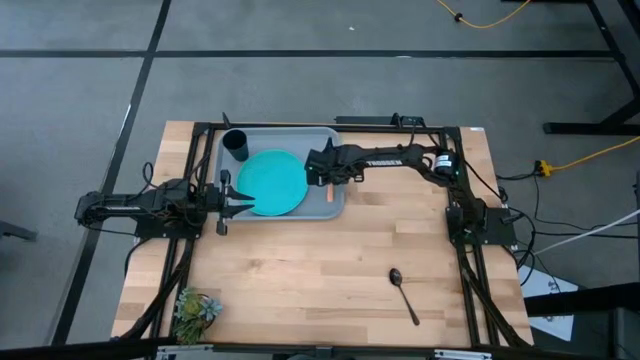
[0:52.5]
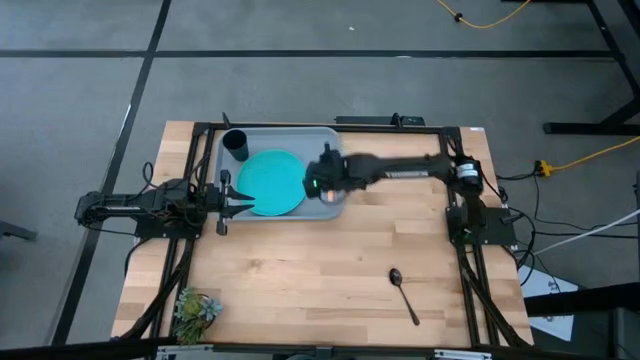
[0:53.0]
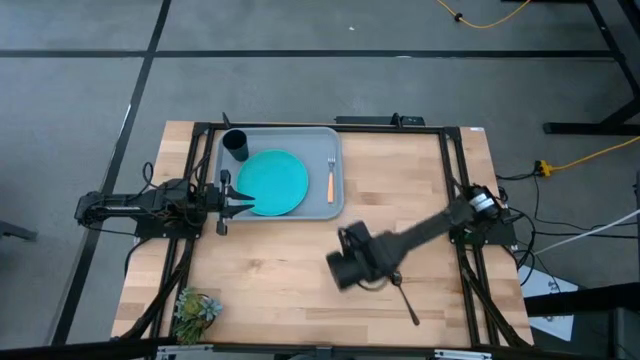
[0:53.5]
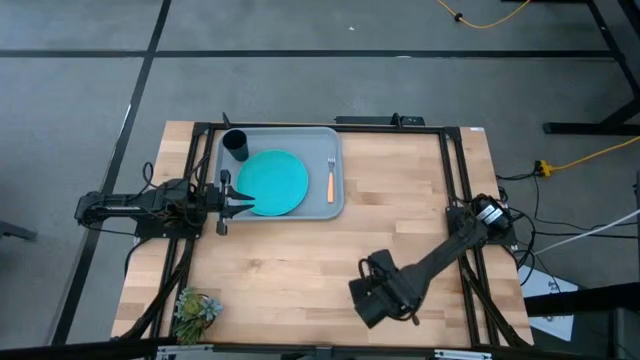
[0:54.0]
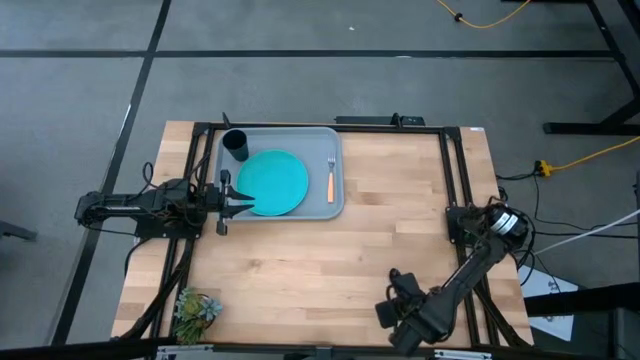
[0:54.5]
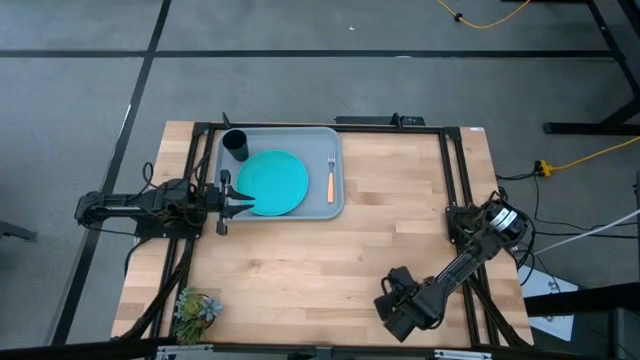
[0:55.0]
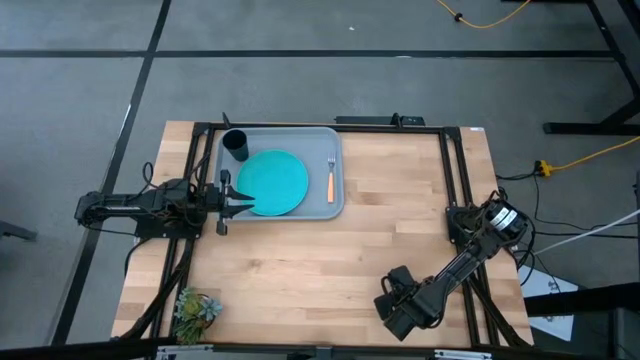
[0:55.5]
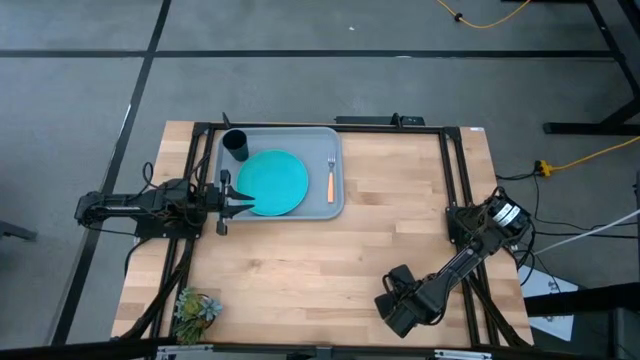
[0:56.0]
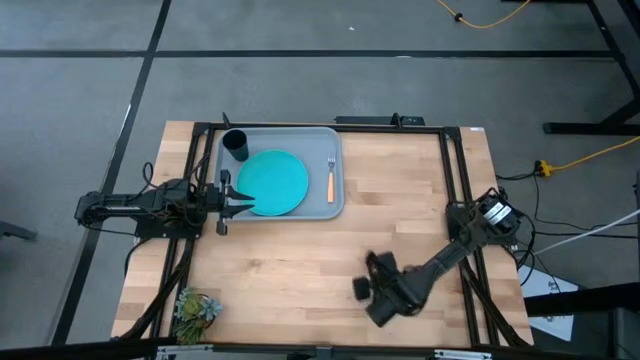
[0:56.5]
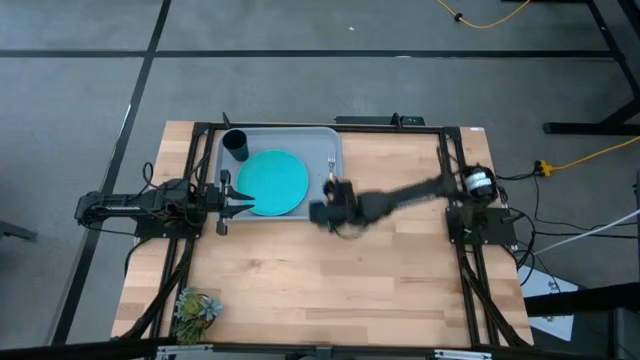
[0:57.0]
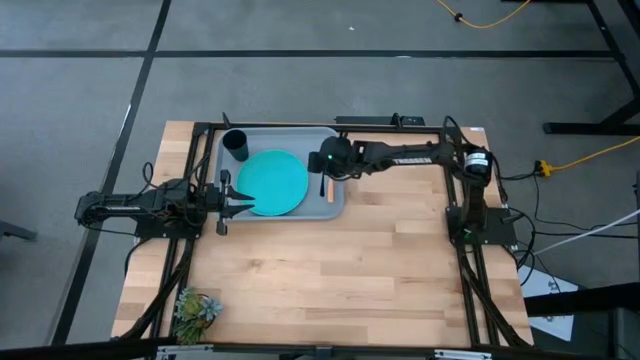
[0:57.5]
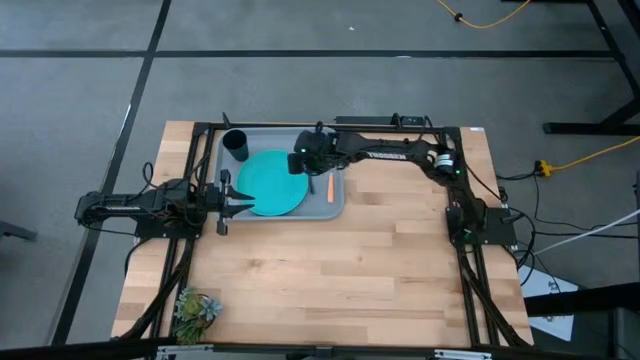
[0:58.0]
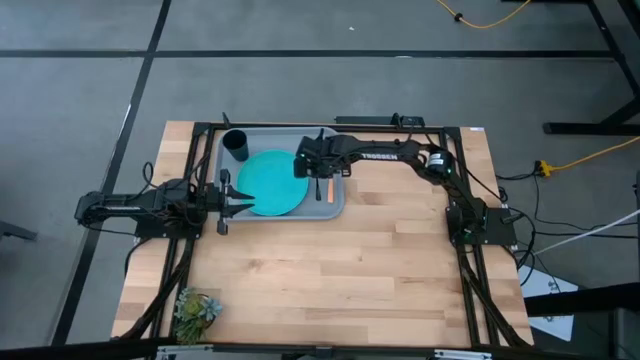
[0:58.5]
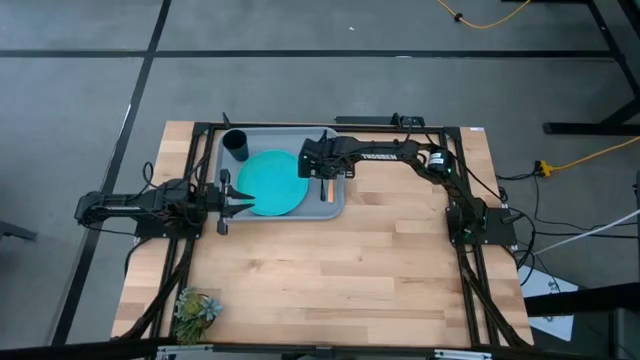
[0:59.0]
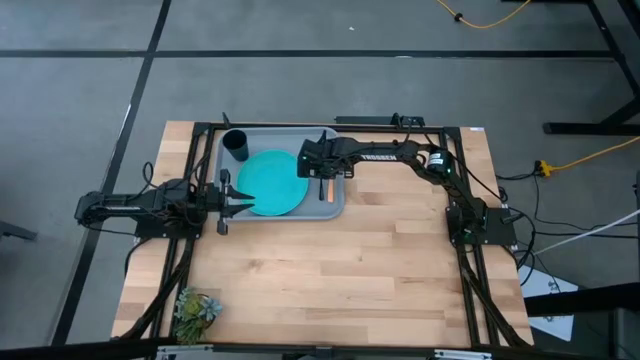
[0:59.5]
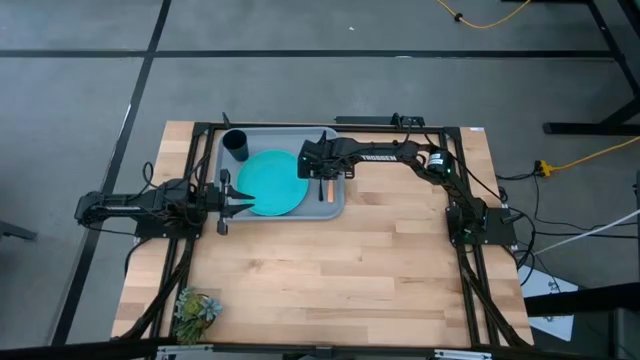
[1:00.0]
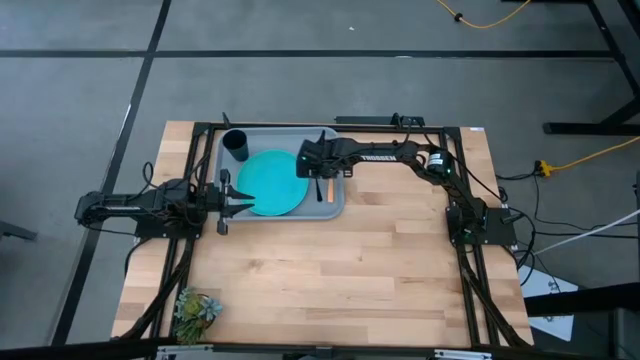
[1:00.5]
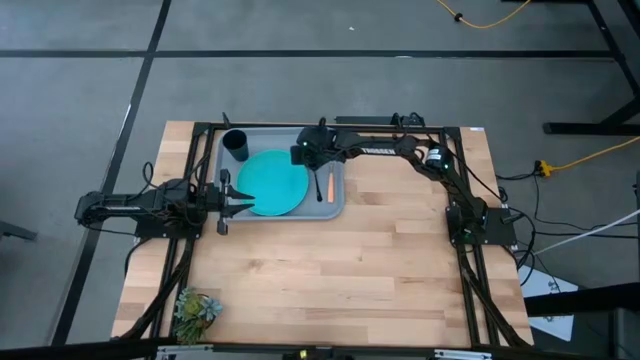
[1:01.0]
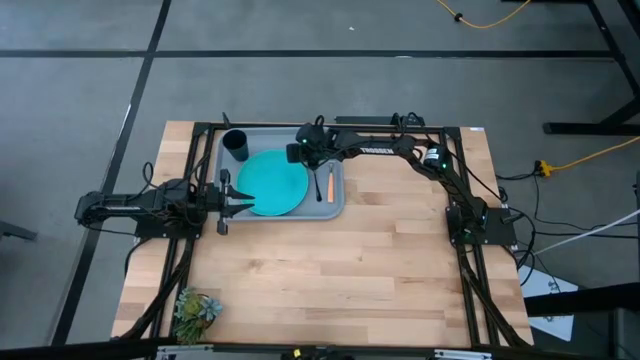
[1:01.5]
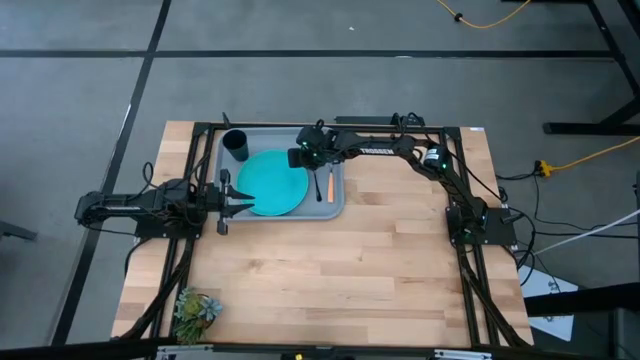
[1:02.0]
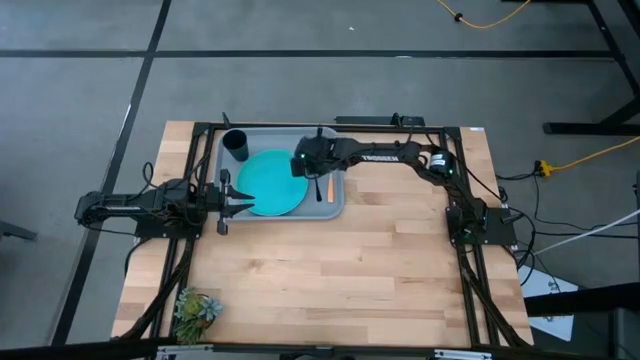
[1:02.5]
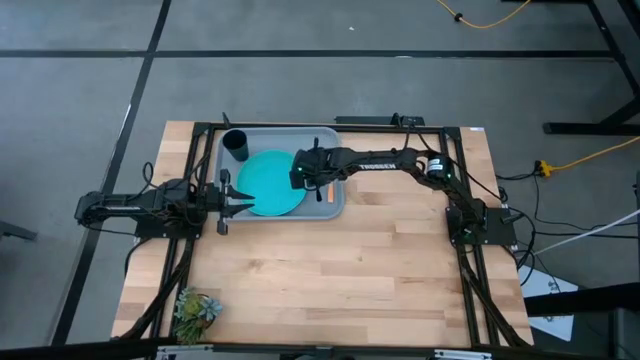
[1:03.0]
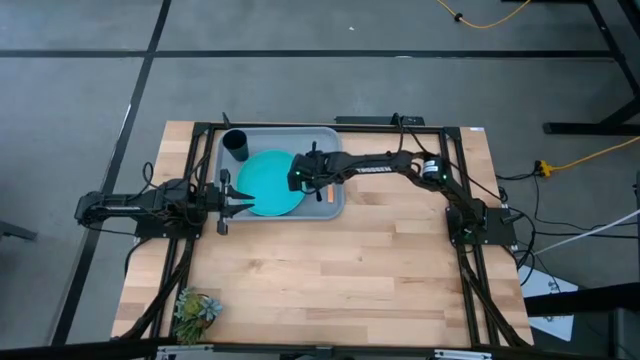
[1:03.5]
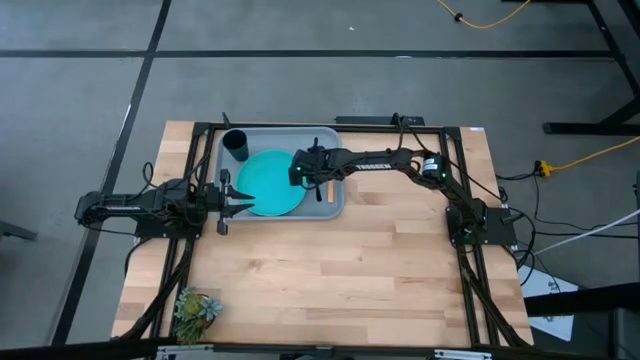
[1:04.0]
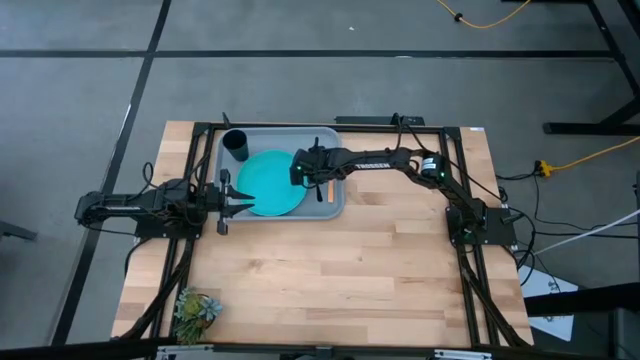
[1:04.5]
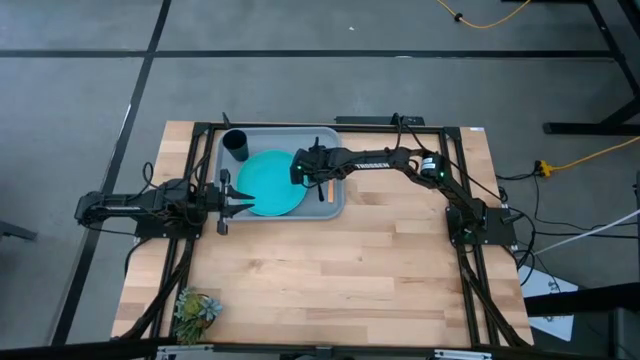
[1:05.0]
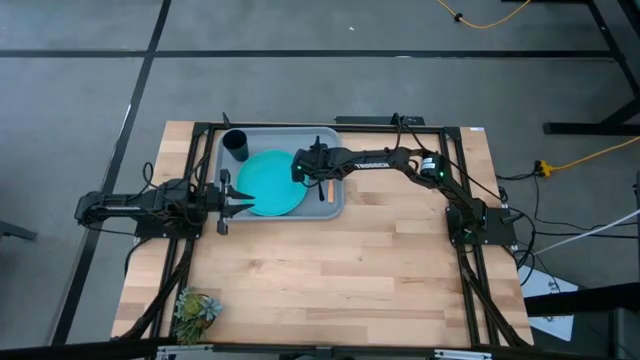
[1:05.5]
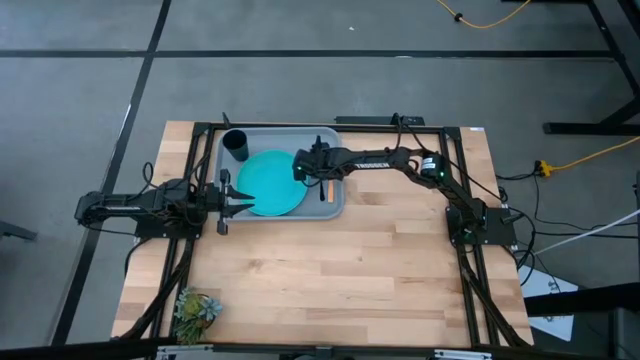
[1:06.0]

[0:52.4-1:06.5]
Task: Pick and place plate/cup/fork/spoon on tray
Put the black spoon on the serving tray left beside the yellow fork

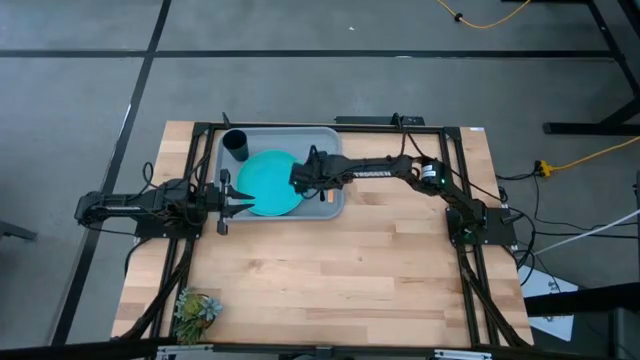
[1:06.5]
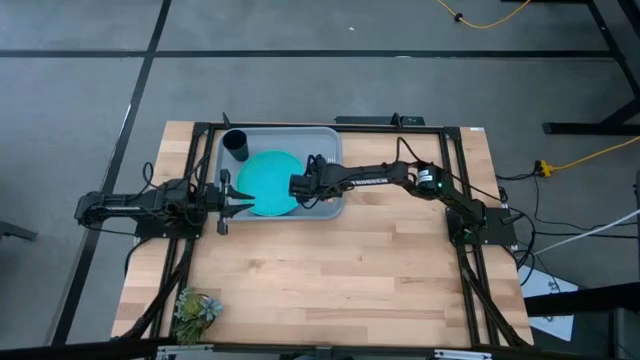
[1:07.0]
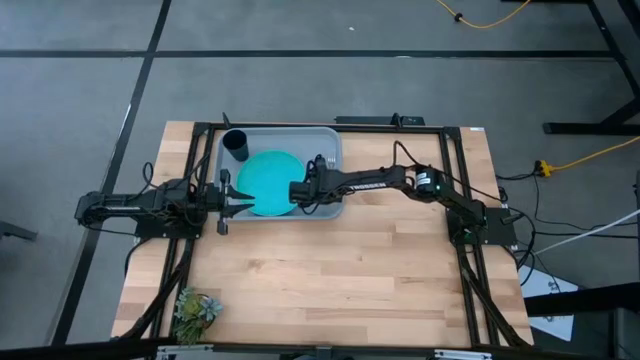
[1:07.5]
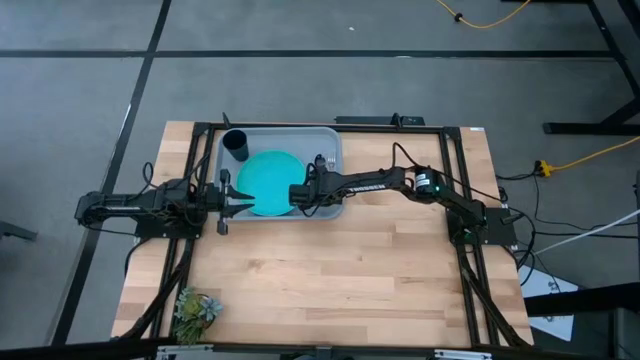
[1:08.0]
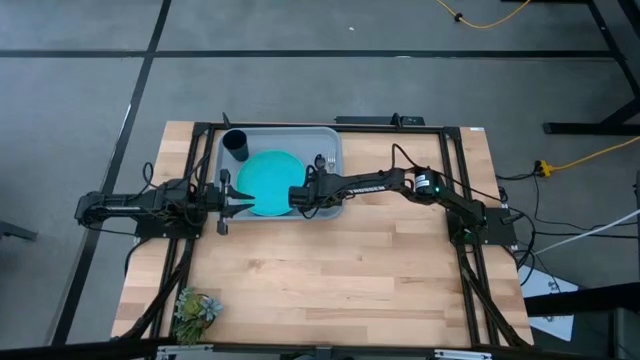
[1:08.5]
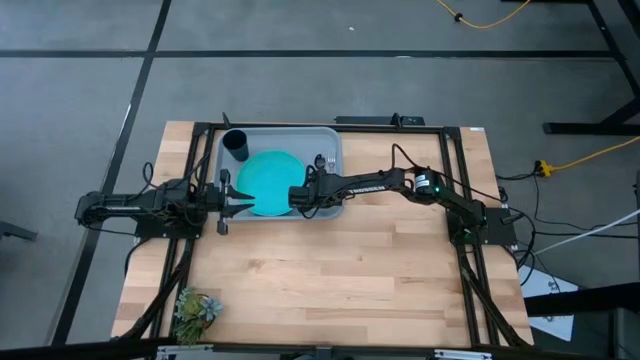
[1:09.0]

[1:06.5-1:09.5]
Adjust the yellow fork on the serving tray

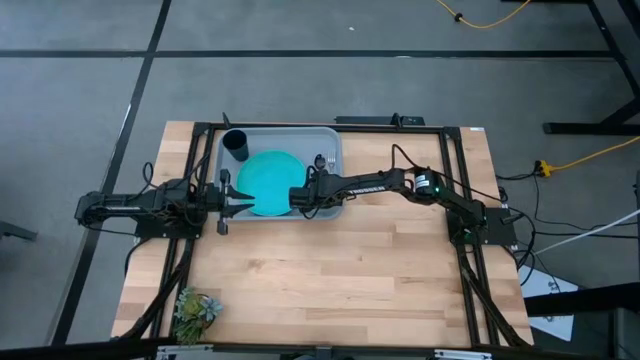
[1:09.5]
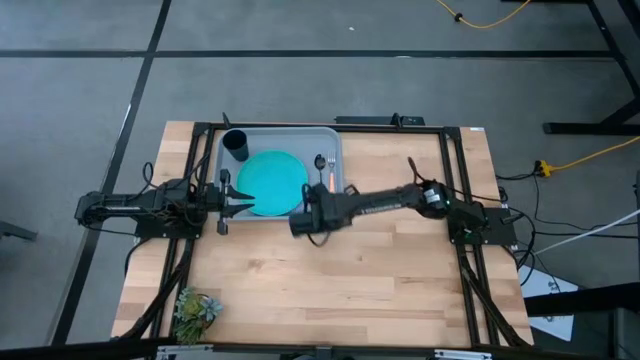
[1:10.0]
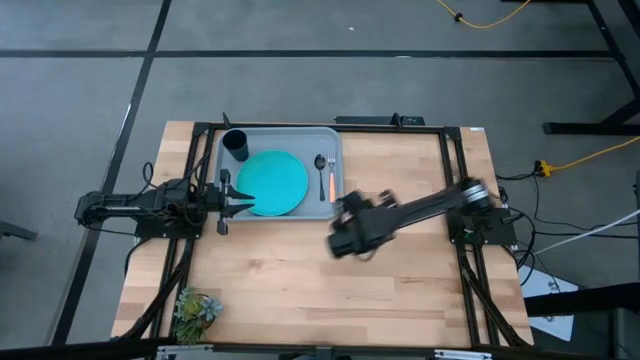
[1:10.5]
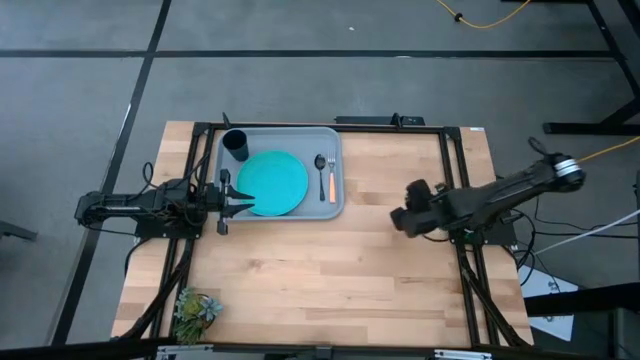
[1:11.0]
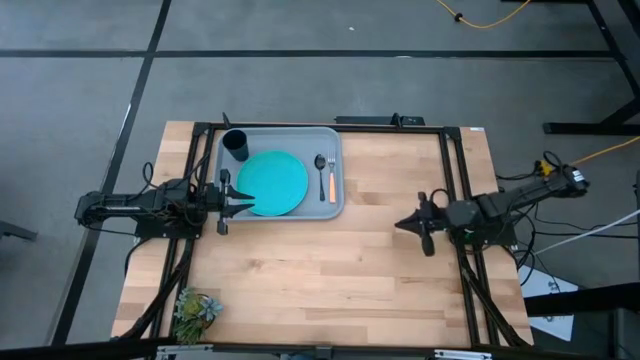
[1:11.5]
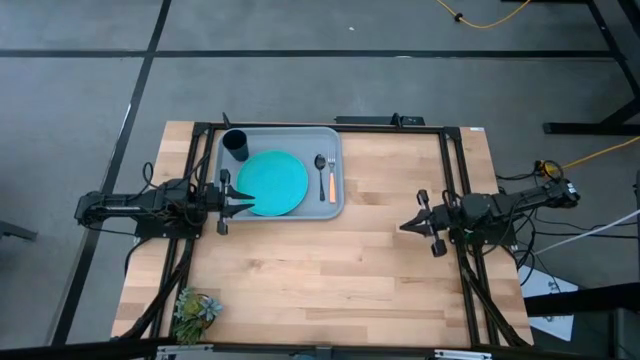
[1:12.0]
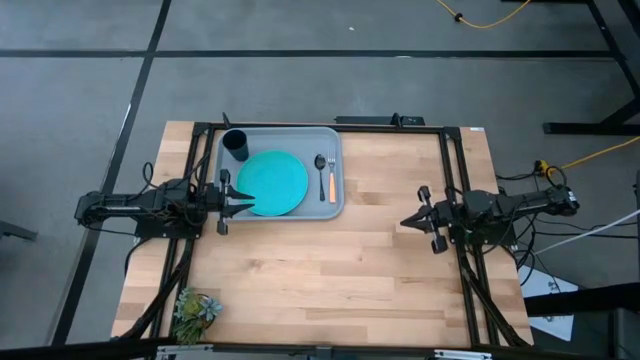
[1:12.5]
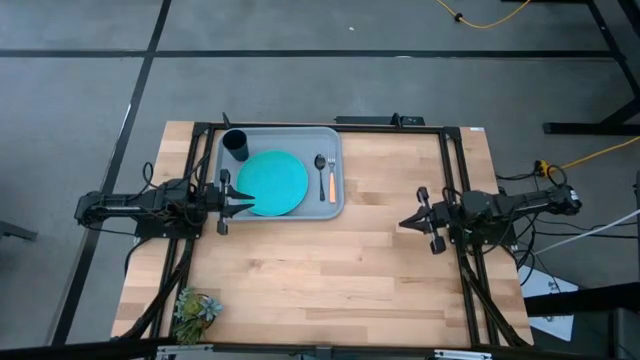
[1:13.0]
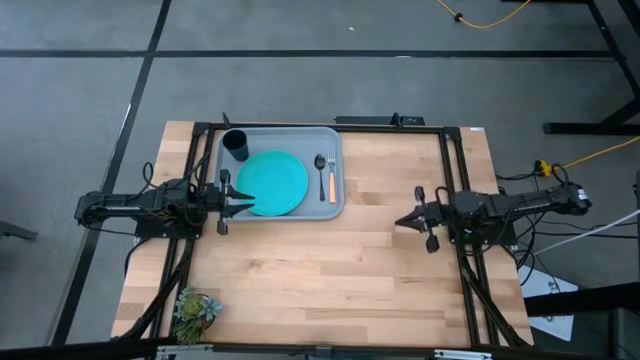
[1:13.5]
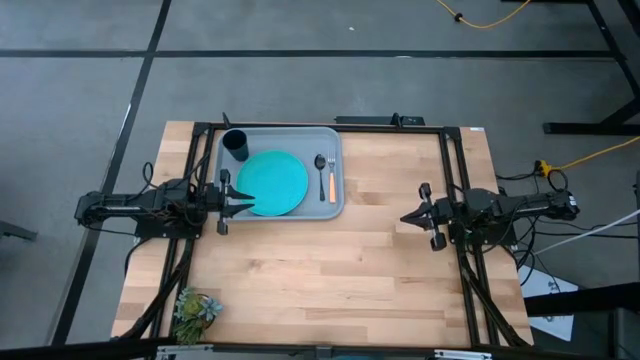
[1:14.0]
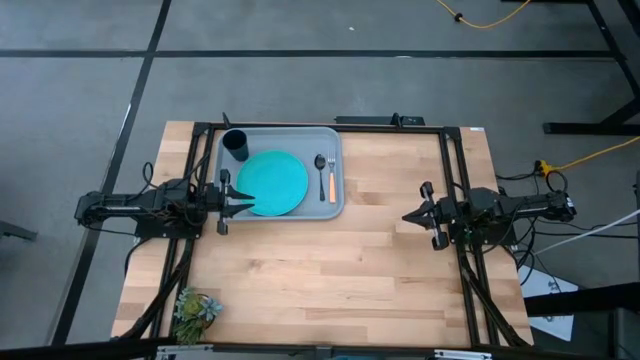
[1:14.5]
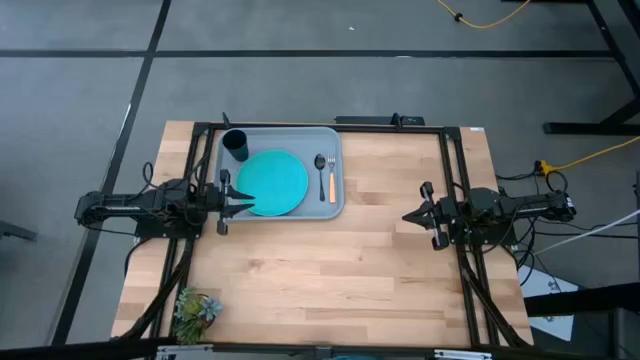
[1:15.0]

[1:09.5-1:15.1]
Return to Home Position
